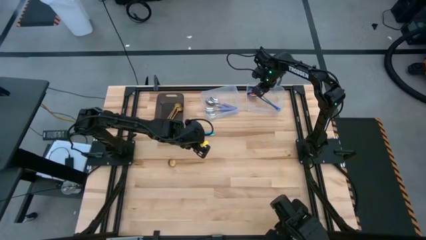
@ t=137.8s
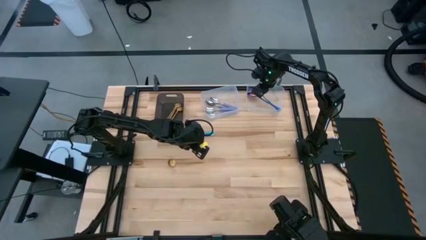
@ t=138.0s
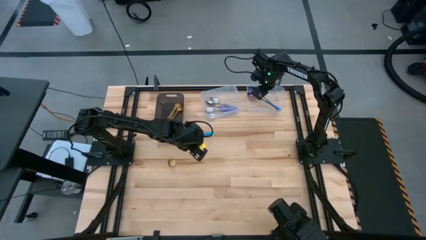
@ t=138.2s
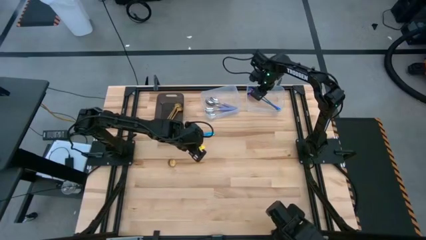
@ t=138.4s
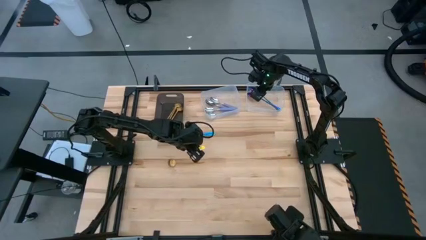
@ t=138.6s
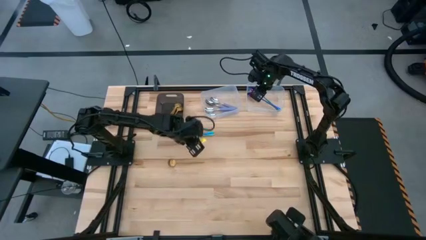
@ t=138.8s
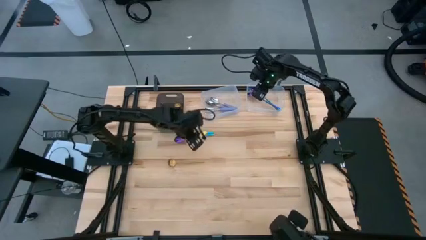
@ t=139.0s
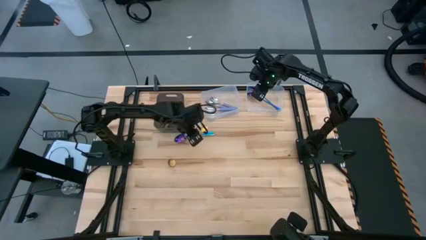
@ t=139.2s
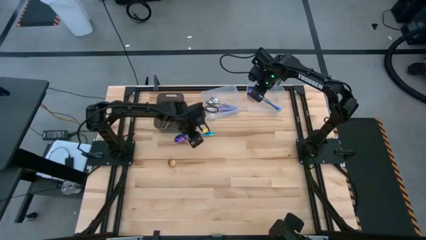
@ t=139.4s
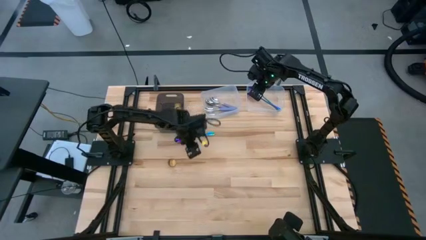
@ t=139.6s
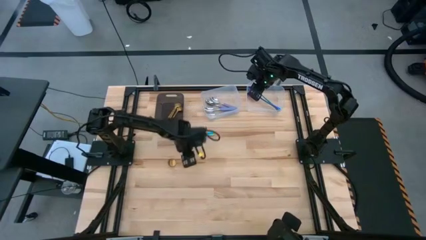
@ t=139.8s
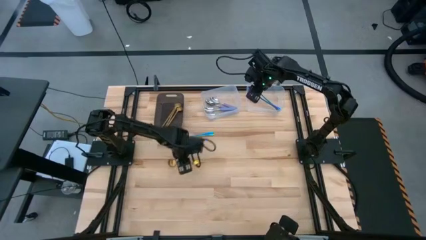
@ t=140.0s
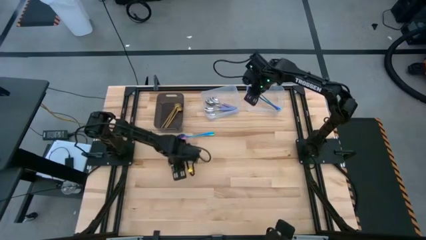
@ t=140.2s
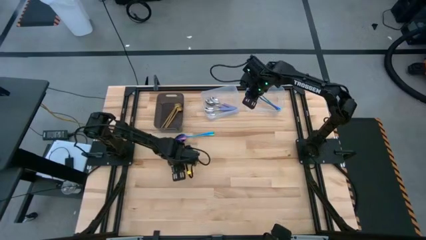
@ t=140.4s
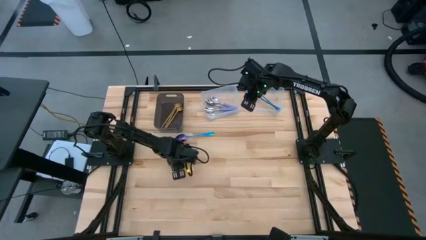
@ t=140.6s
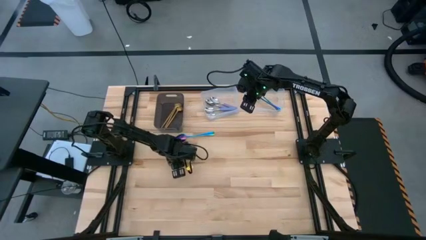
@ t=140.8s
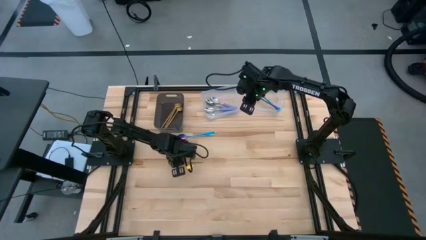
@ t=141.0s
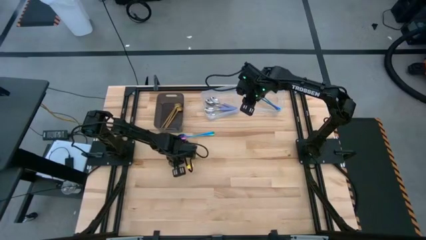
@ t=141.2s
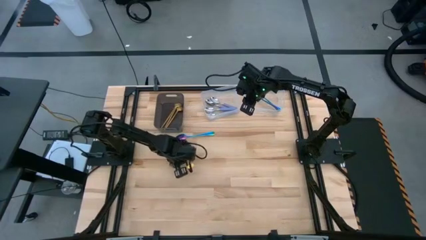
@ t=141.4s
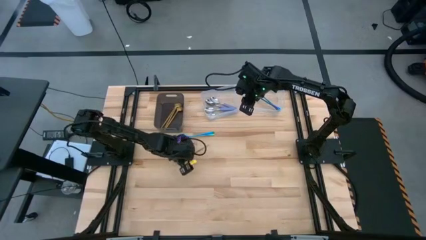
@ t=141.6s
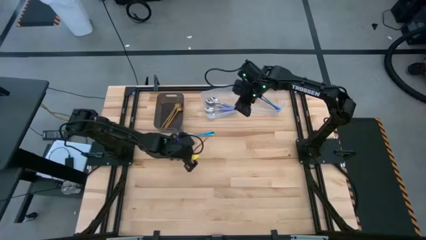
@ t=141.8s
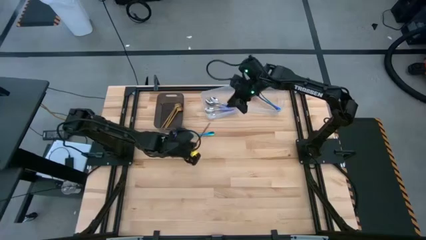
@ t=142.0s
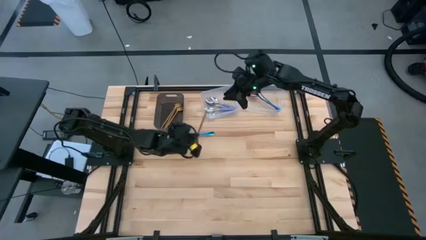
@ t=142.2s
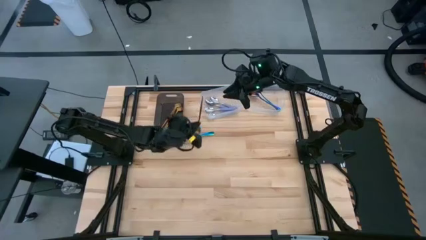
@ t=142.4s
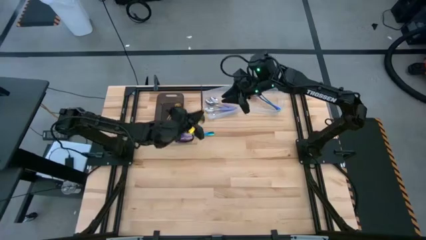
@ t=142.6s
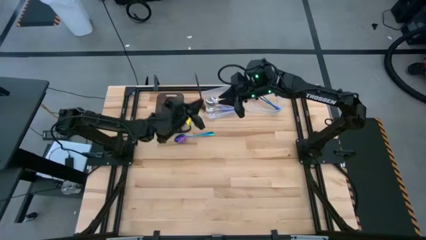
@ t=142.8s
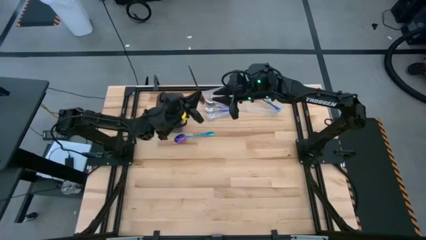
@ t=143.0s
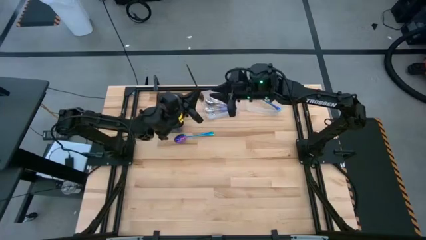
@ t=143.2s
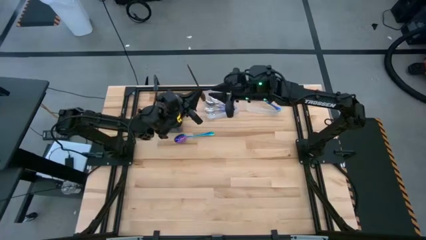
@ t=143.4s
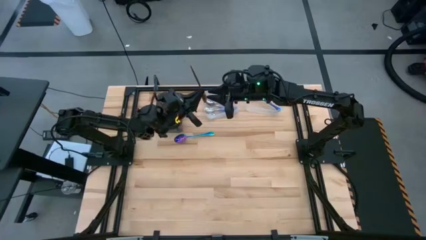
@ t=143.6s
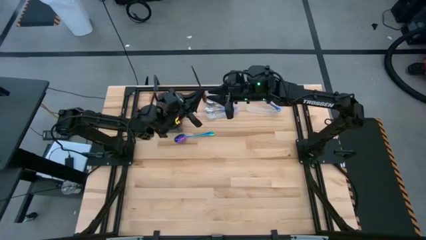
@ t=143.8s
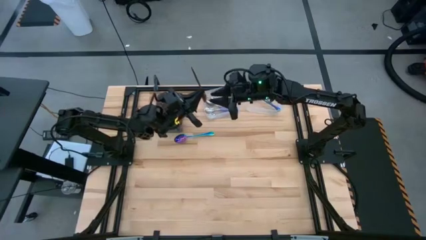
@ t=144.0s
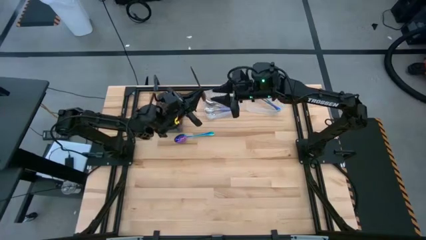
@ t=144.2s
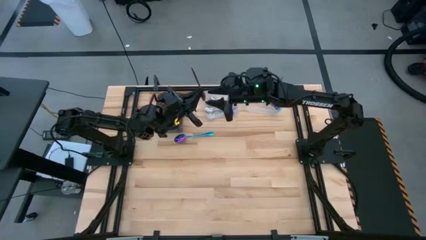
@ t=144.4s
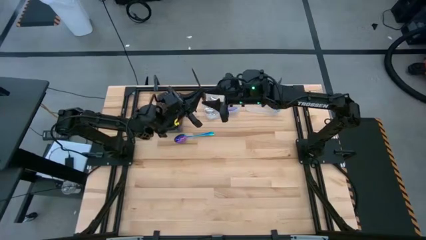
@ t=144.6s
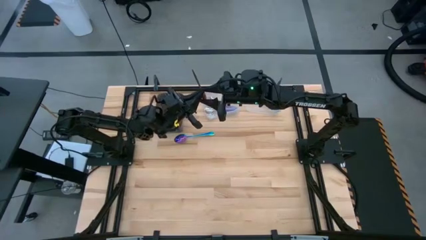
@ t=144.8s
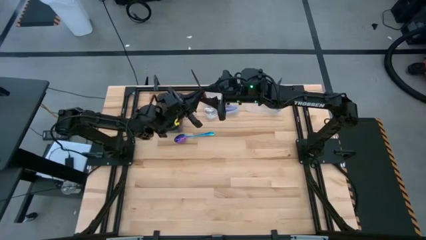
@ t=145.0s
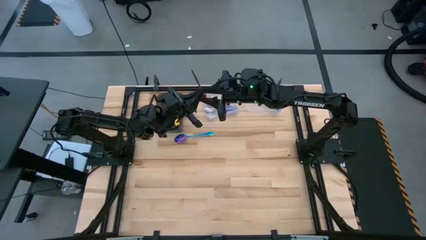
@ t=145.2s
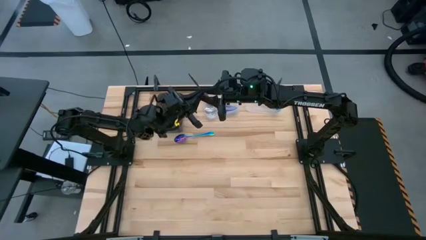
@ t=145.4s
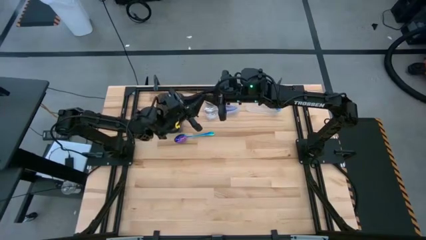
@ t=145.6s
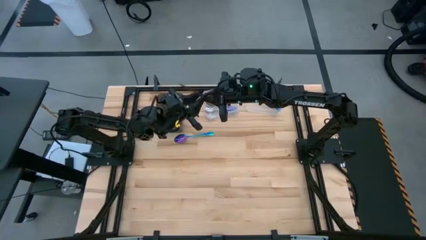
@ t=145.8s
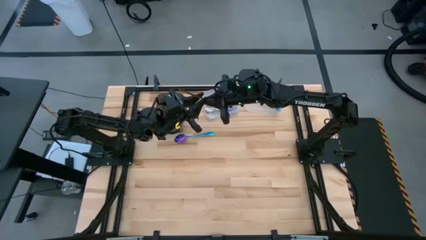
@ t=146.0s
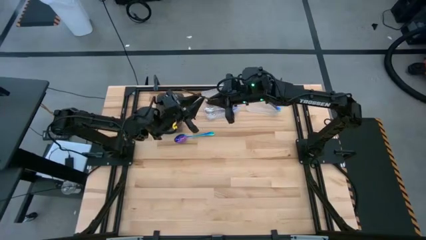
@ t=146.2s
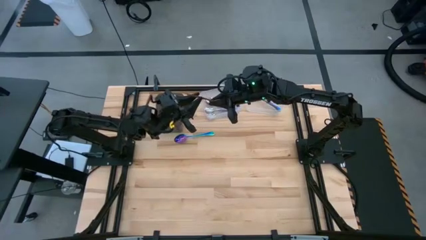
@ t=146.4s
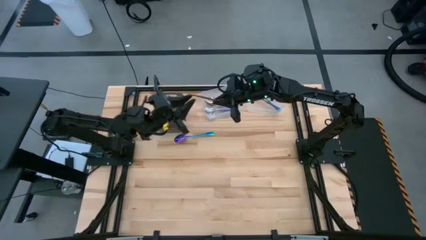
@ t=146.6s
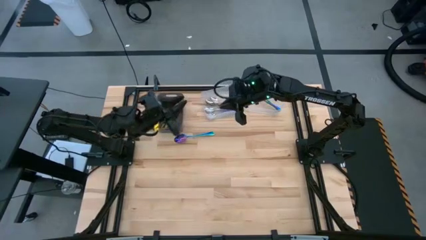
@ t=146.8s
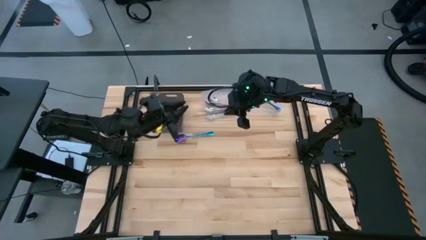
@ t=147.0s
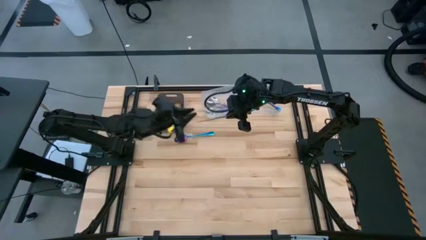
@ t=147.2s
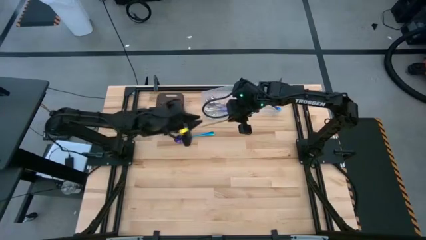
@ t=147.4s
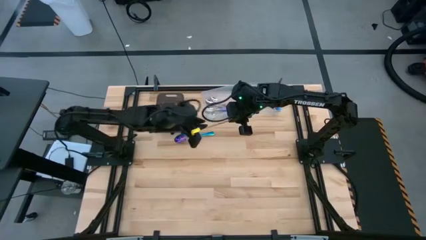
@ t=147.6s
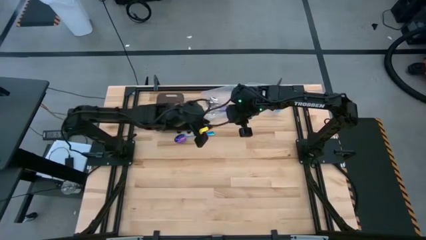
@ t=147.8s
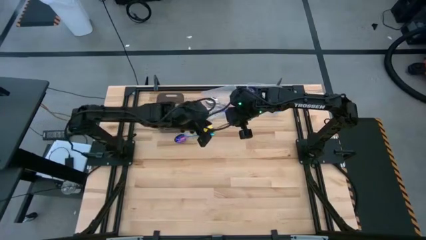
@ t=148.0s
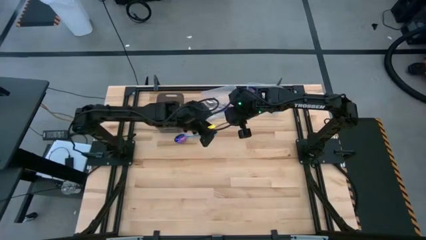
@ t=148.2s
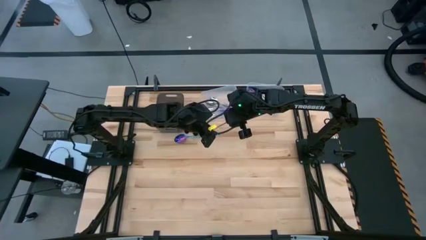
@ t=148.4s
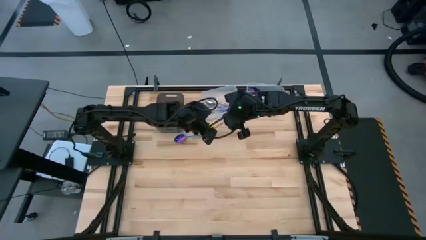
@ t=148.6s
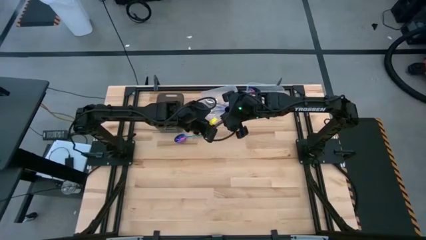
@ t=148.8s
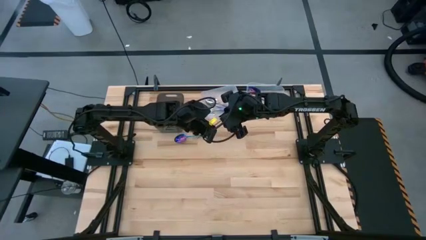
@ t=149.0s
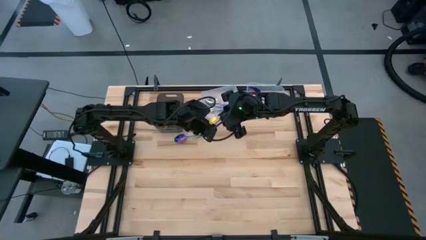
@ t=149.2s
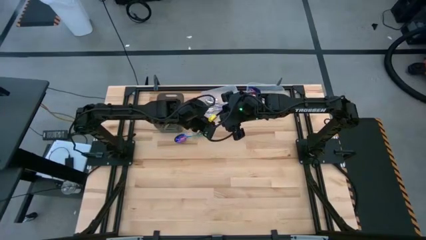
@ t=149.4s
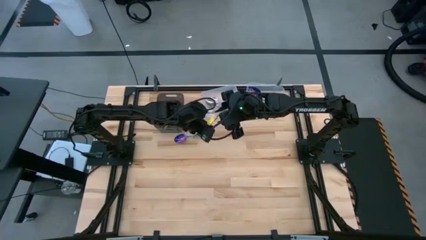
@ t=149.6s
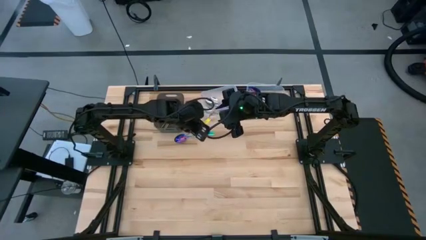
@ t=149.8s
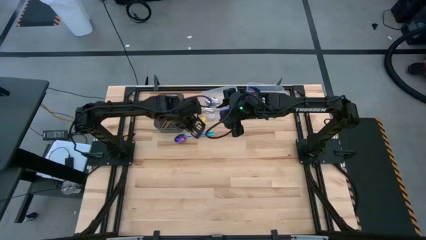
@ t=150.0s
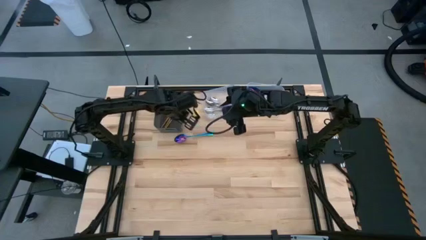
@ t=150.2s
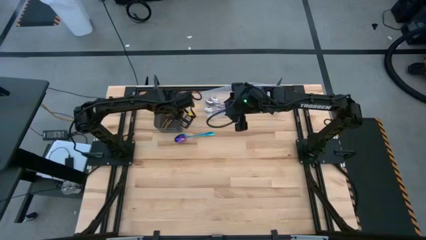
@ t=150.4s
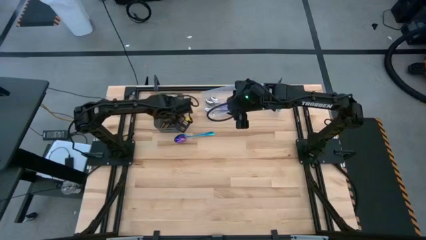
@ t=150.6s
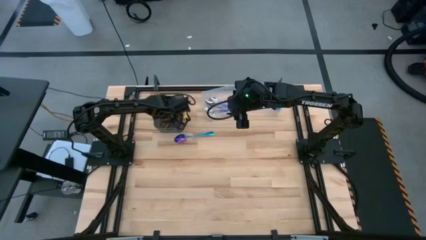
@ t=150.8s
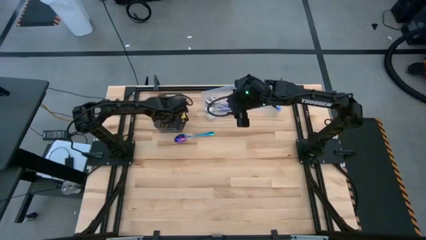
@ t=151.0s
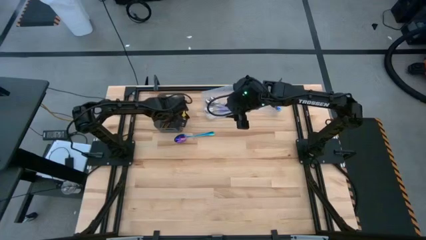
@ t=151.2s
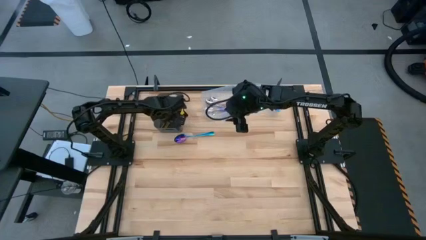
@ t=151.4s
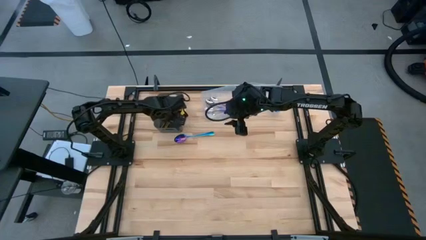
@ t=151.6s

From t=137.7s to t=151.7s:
Task: Sort silverware by color (type)
Put the gold spoon into the black bin
